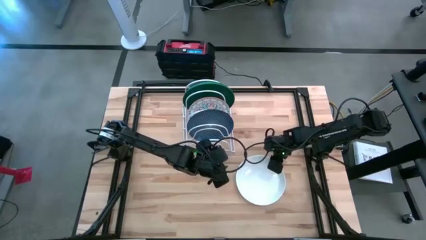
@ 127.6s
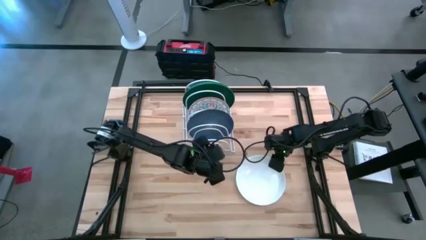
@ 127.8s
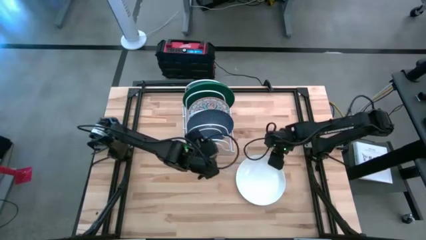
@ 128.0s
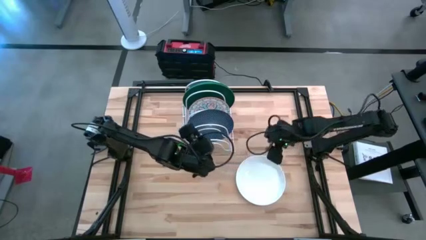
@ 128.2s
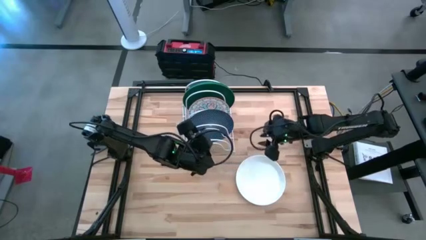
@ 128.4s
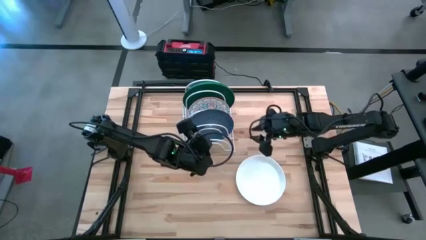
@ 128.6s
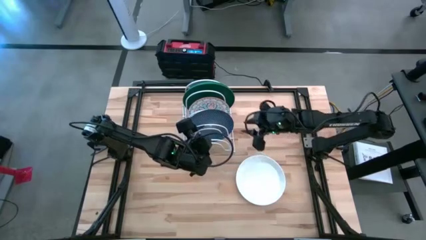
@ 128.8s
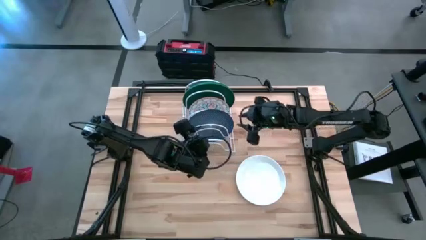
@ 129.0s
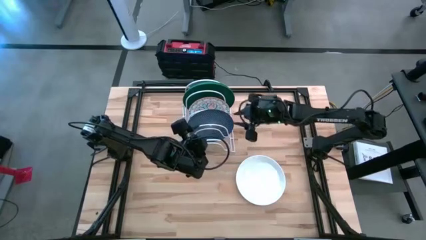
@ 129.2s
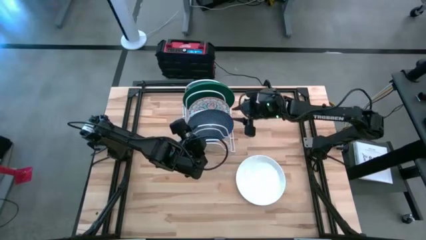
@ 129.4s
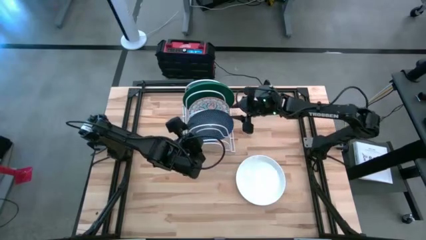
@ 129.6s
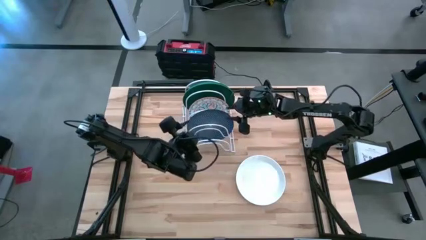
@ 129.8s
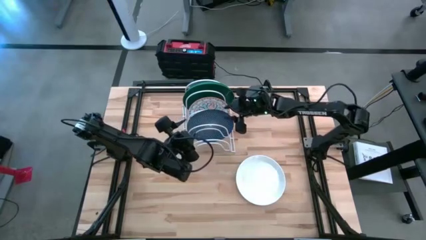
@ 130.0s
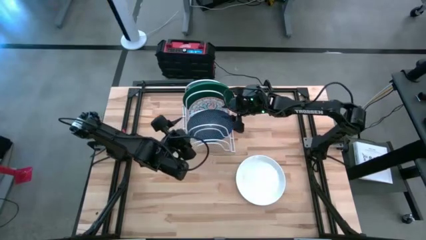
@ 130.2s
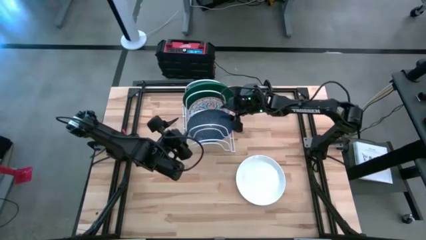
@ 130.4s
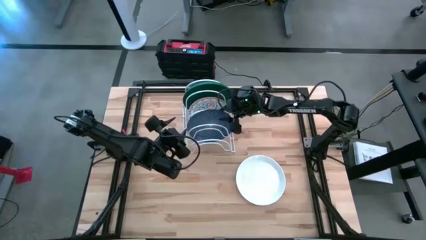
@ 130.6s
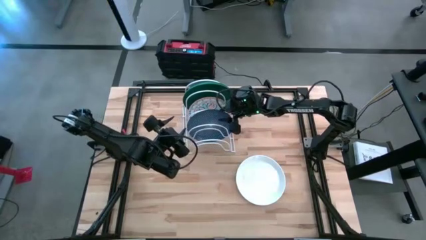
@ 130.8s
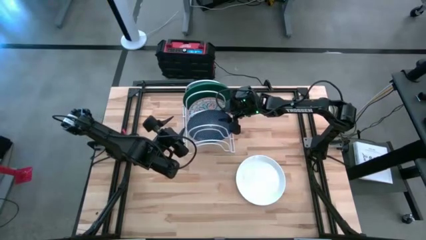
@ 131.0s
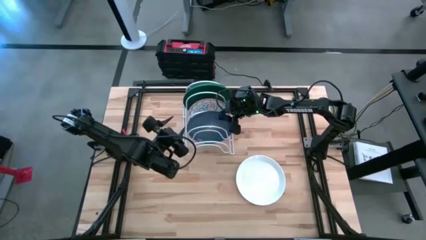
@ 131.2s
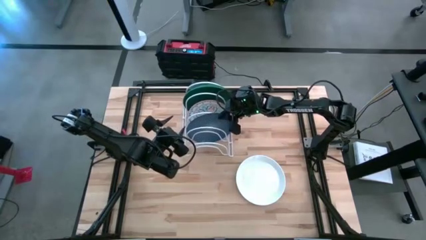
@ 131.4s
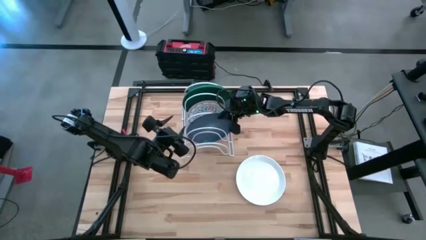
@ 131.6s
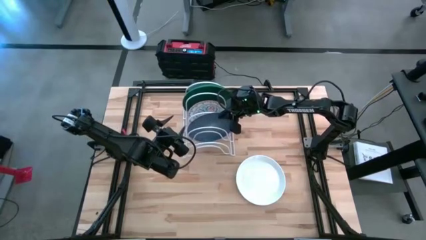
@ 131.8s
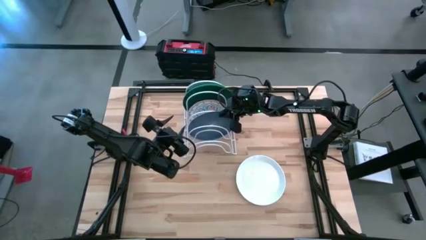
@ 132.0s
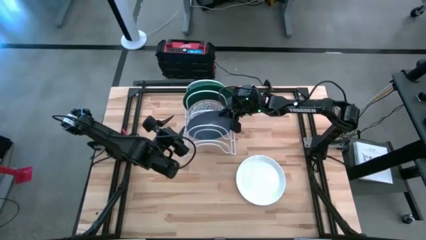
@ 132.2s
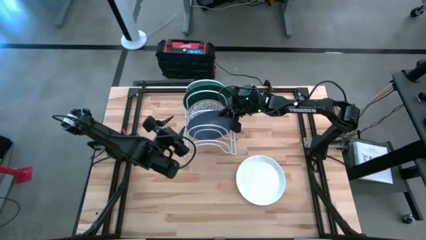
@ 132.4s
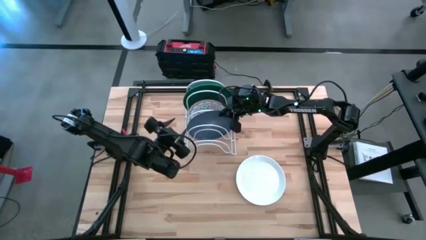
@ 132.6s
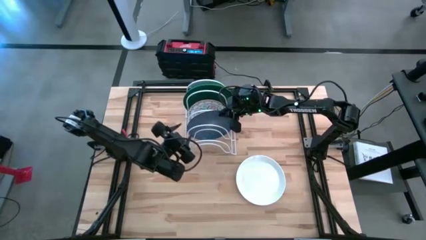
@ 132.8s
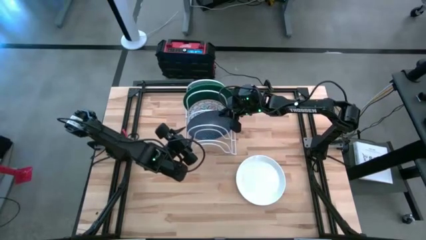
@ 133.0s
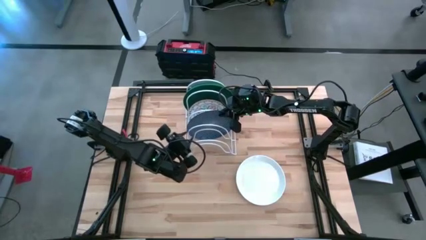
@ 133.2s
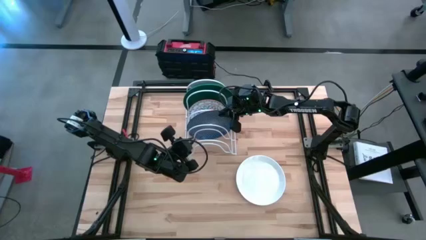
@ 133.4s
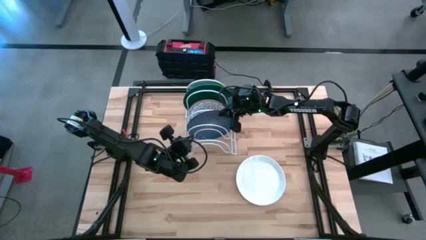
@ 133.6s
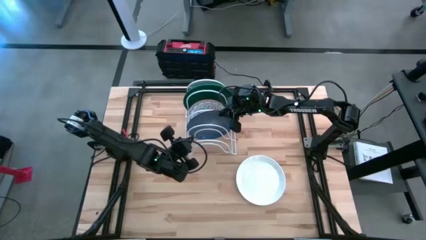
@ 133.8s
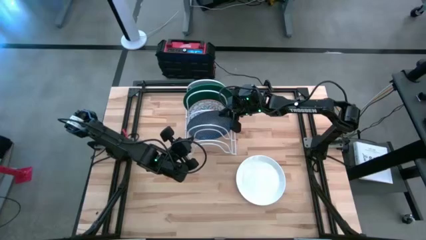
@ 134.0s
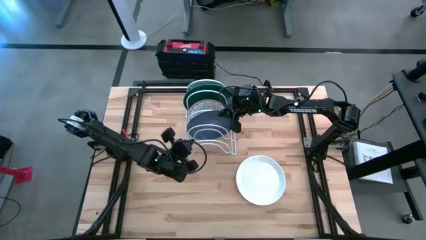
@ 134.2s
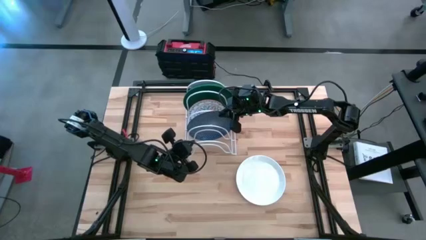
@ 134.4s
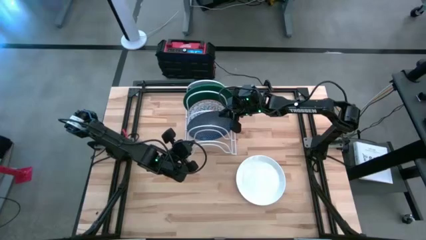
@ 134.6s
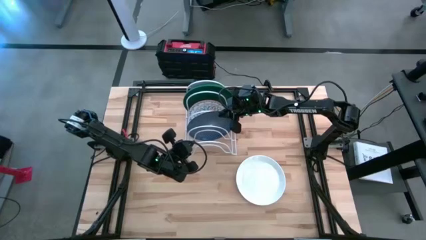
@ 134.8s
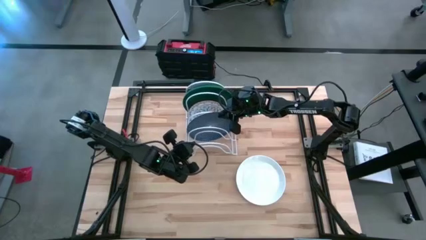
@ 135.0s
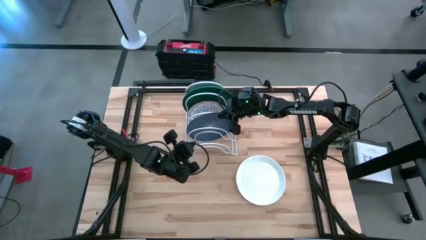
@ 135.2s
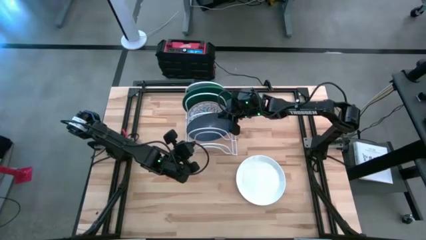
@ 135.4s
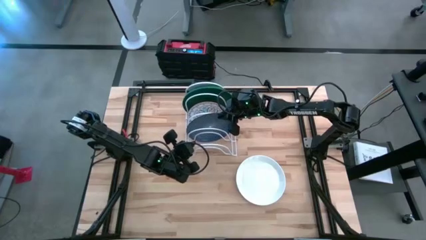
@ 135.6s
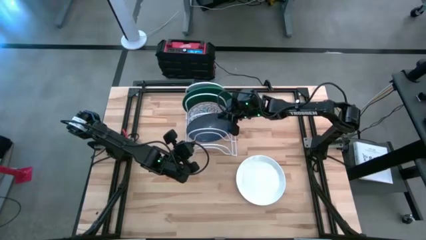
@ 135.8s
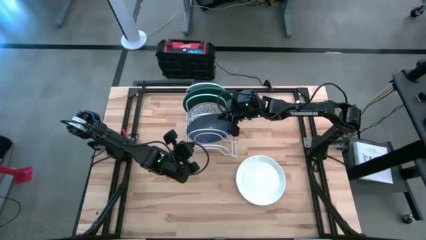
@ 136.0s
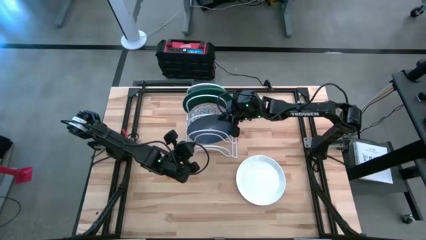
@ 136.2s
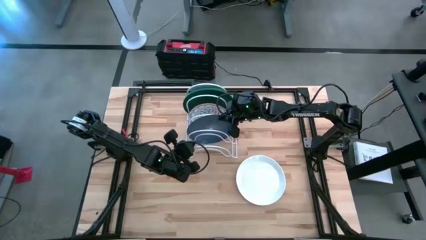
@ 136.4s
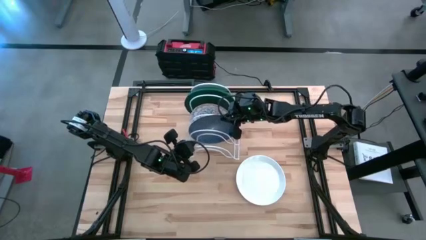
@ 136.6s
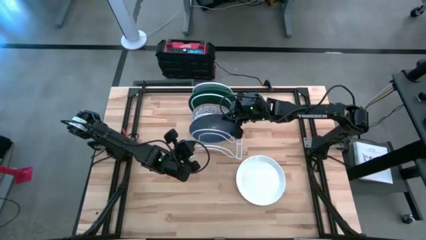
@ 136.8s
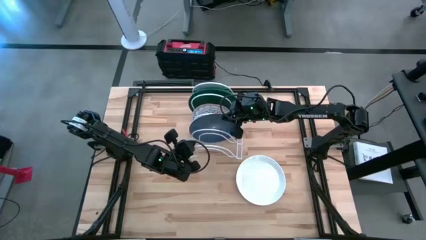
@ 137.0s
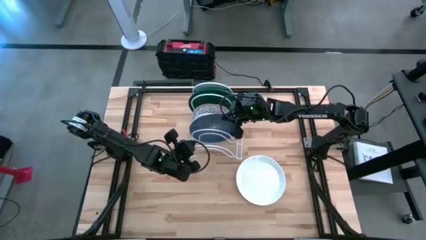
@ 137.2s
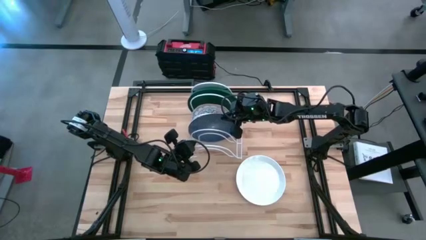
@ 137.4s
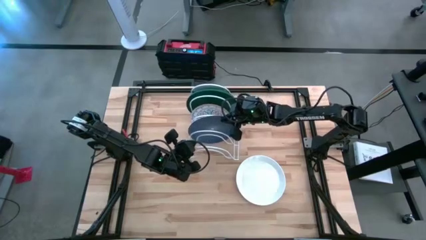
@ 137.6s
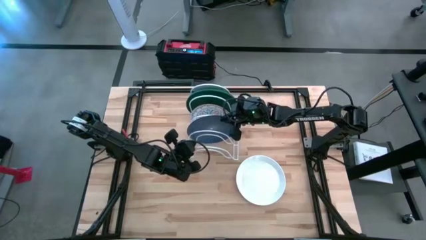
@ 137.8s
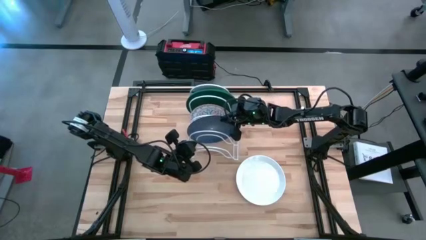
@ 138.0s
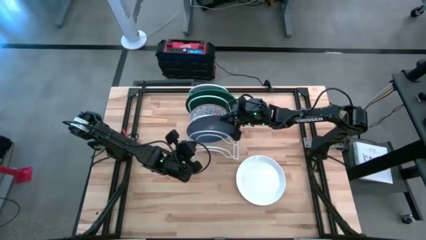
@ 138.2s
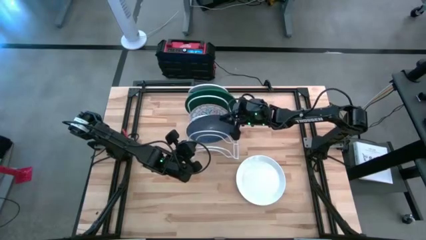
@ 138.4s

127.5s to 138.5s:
Task: Sort dishes
Remove the blue patterned plate from the dish rack

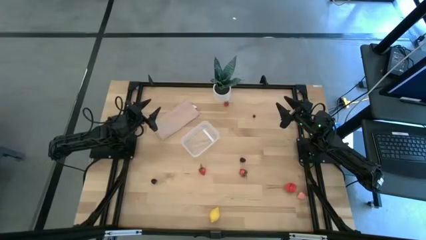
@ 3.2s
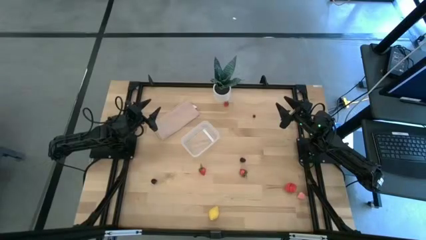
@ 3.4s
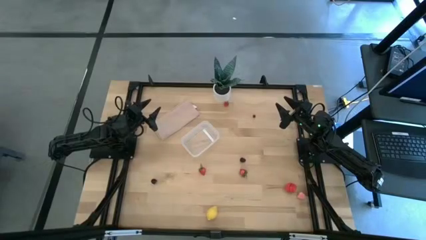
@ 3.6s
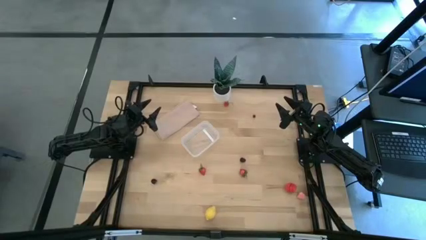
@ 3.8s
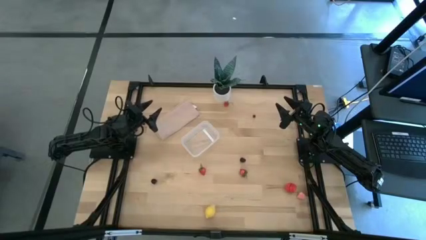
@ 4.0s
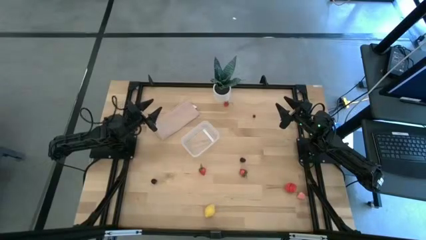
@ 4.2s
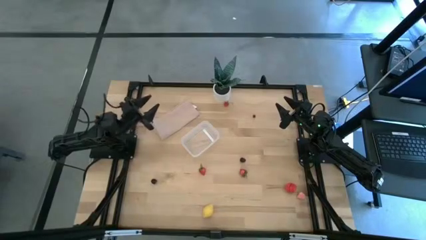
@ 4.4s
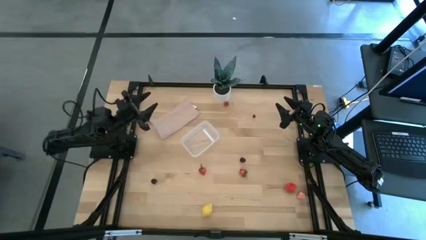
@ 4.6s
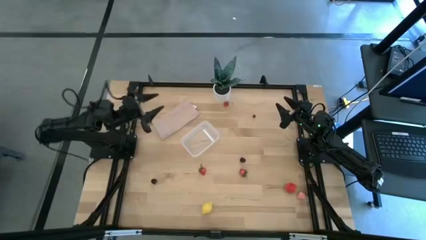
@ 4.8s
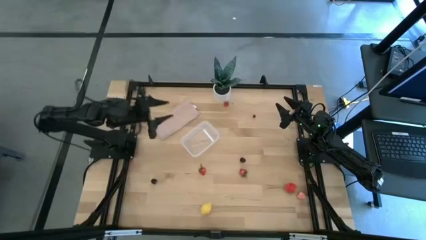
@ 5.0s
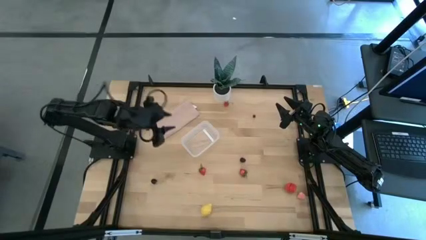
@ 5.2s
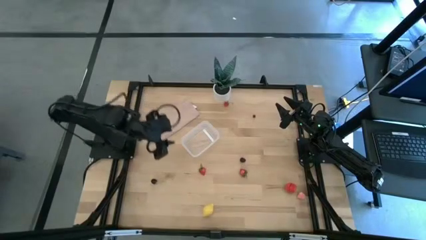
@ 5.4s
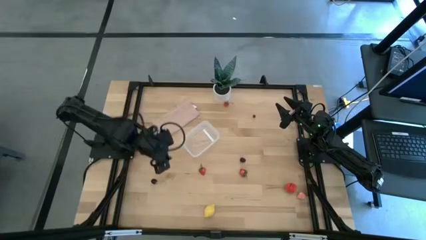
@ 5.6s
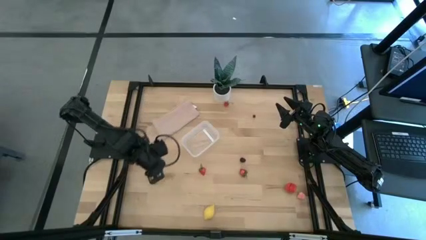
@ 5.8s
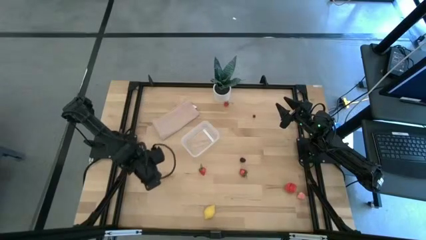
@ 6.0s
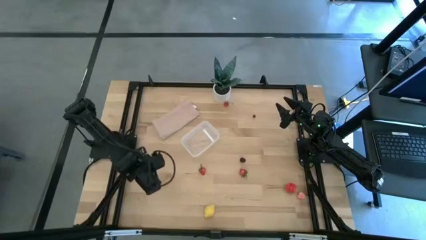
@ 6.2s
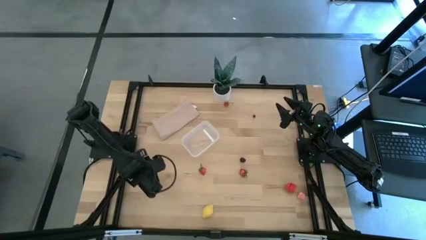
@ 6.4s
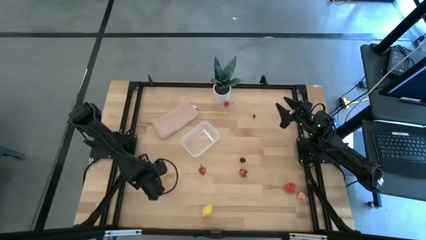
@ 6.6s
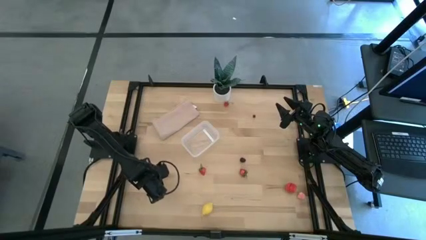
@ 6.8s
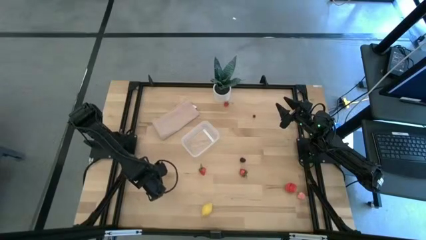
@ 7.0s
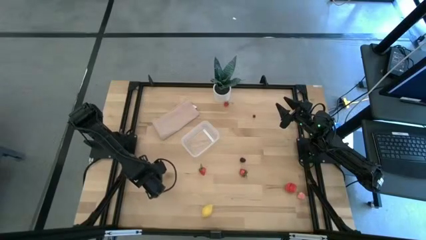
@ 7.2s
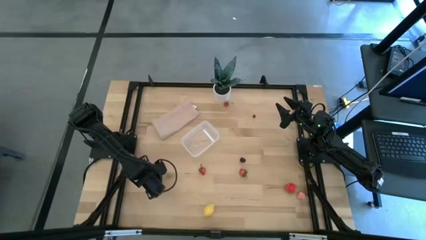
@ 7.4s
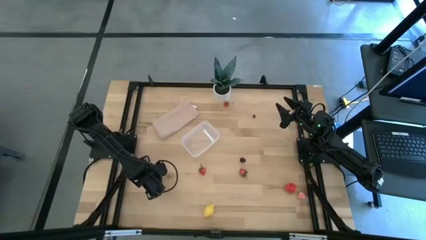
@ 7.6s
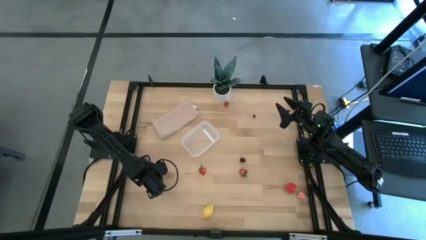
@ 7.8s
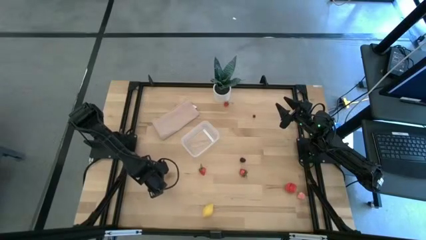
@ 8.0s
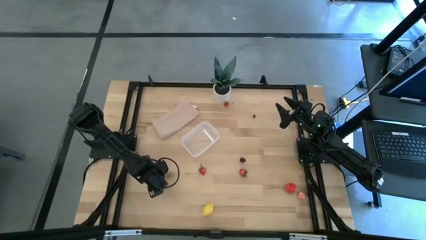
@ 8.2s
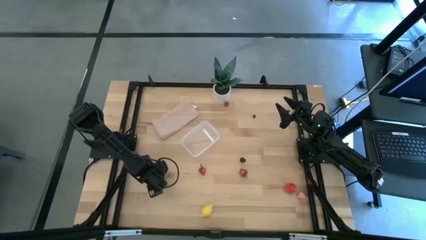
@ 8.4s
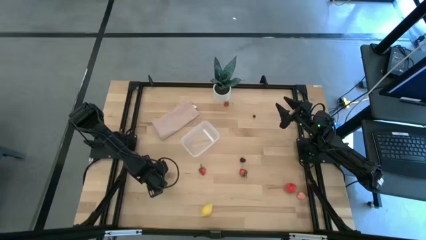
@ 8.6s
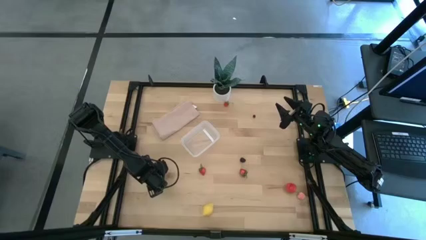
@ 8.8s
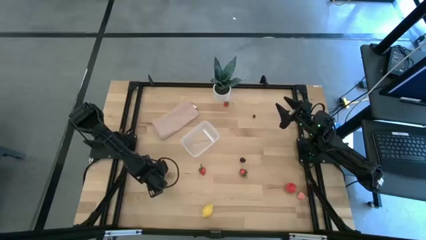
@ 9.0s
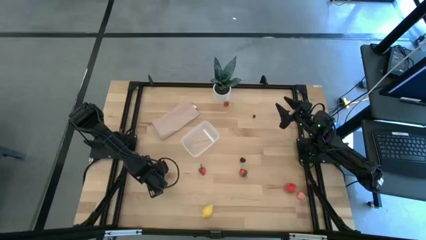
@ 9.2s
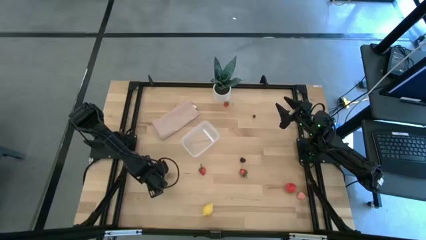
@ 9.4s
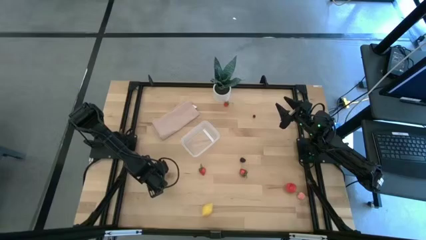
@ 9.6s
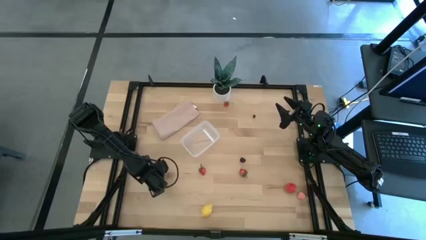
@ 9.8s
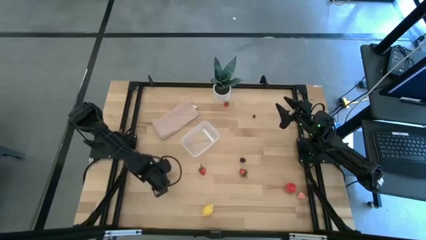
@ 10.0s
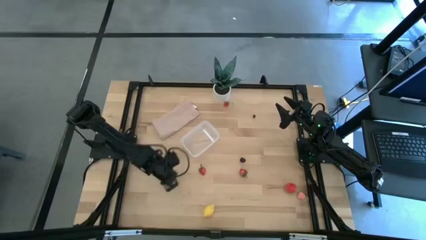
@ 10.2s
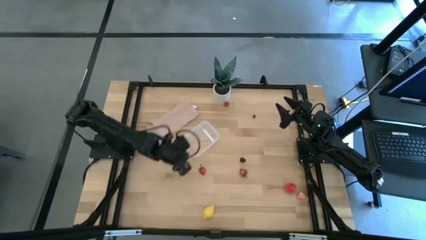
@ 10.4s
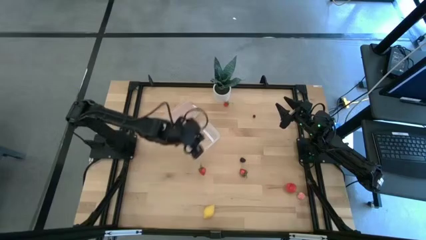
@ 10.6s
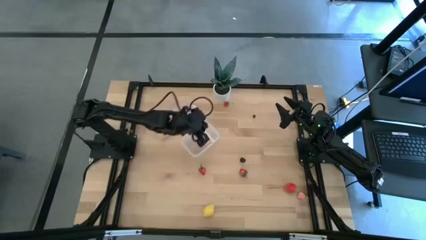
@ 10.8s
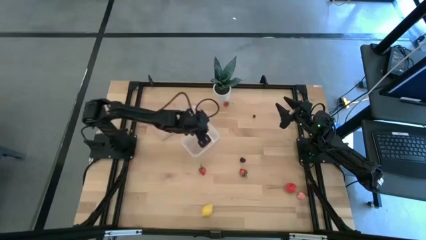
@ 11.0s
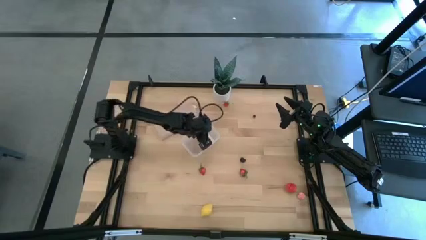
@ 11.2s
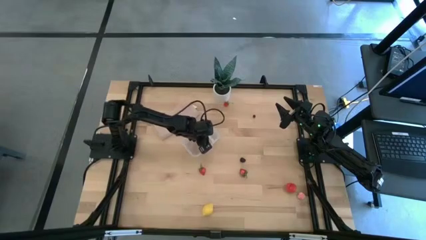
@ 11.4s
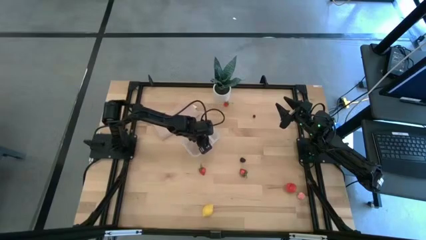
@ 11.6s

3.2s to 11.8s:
Task: Pick and placing Produce into tupperware
Put the left black mulberry into the transparent bin
